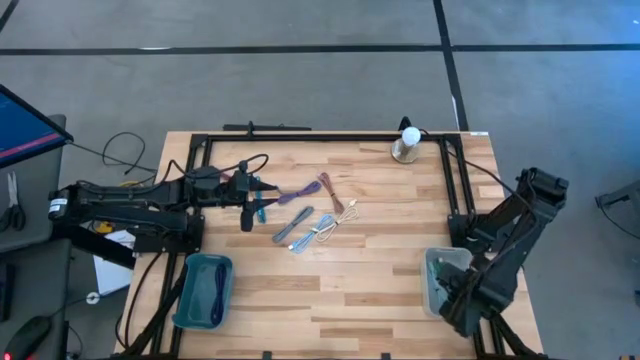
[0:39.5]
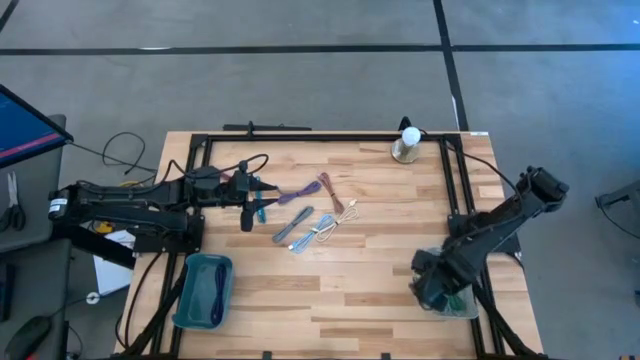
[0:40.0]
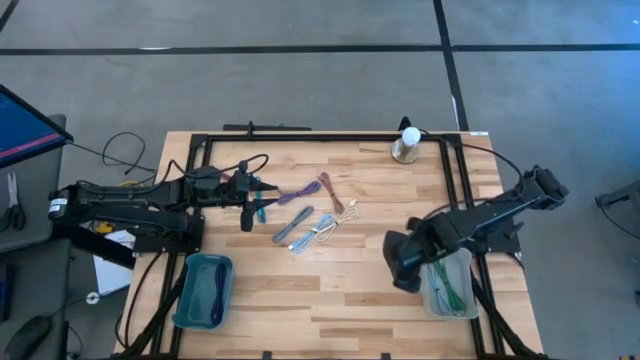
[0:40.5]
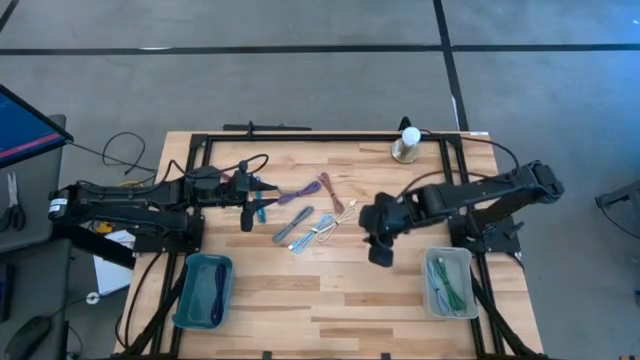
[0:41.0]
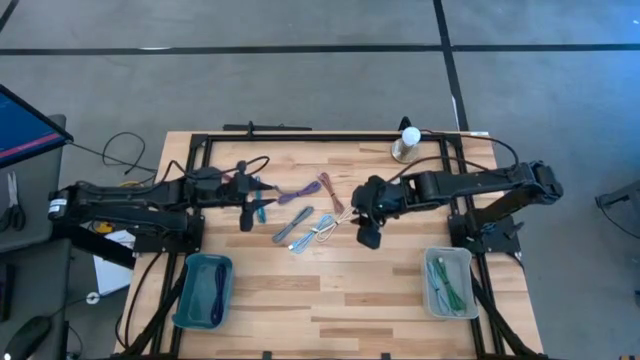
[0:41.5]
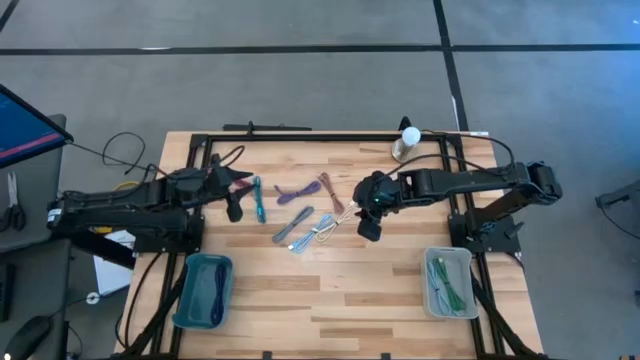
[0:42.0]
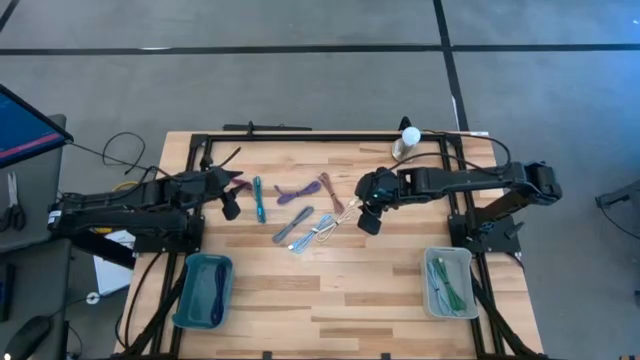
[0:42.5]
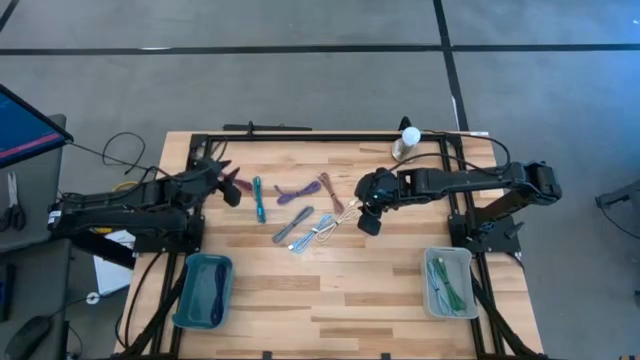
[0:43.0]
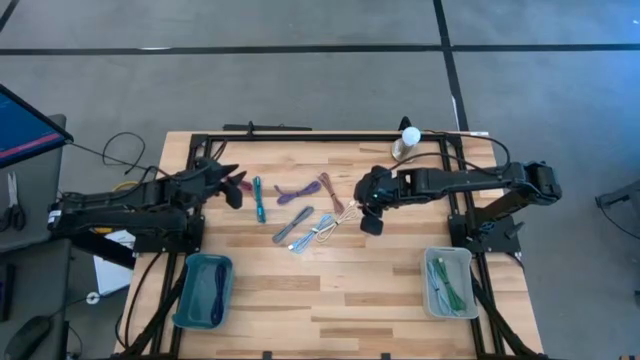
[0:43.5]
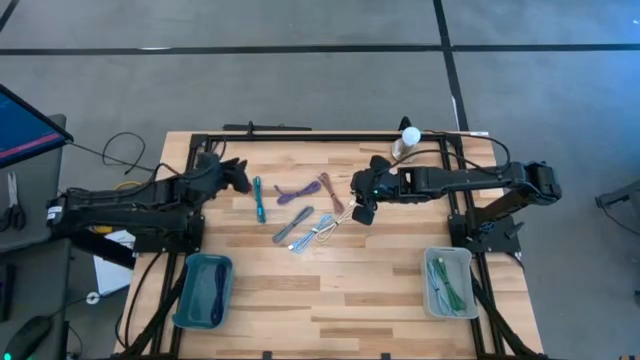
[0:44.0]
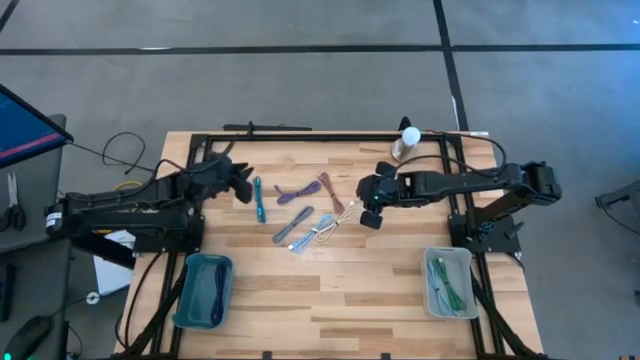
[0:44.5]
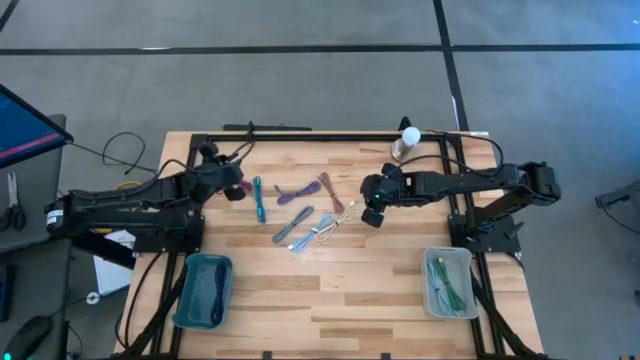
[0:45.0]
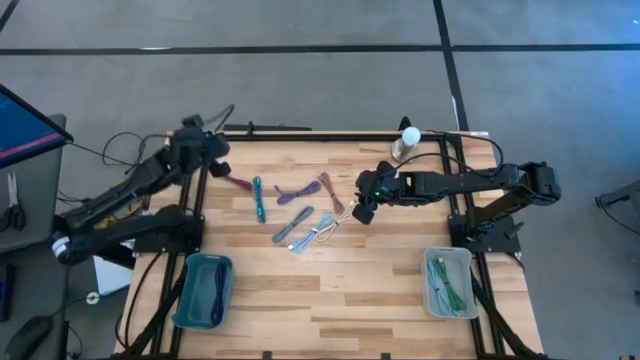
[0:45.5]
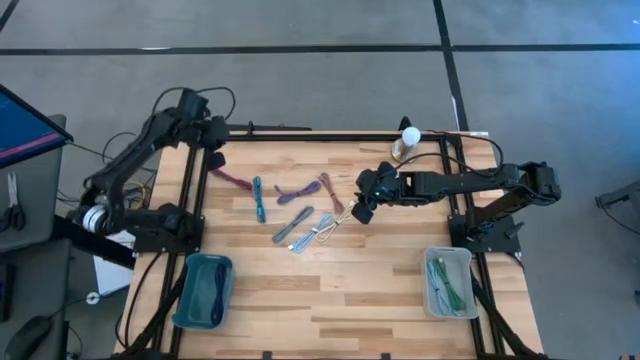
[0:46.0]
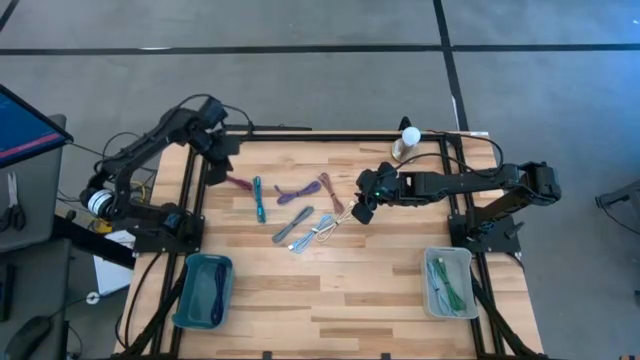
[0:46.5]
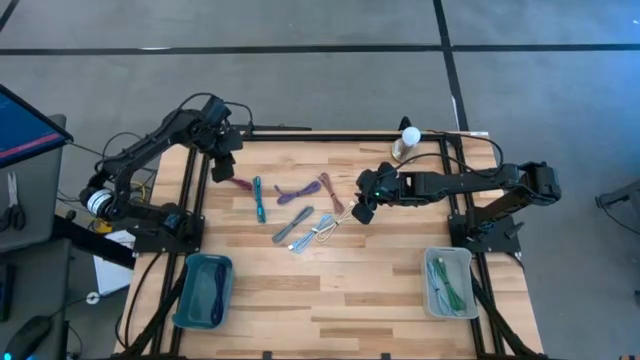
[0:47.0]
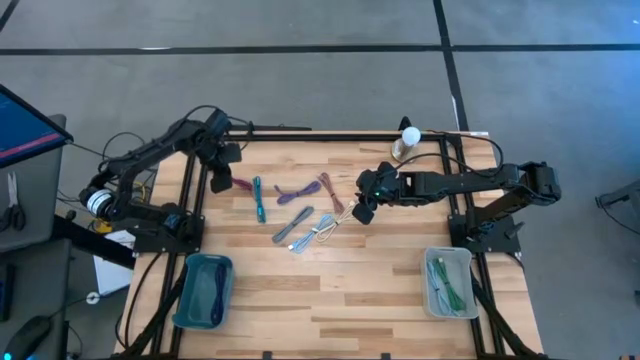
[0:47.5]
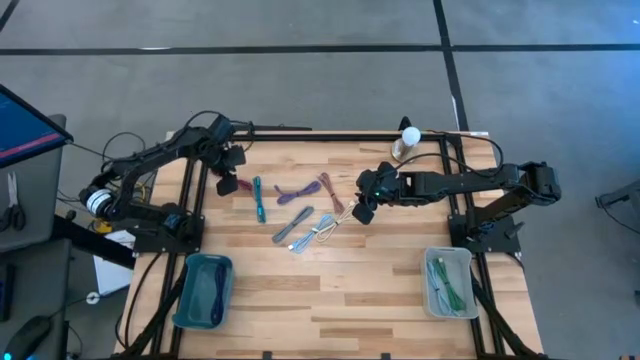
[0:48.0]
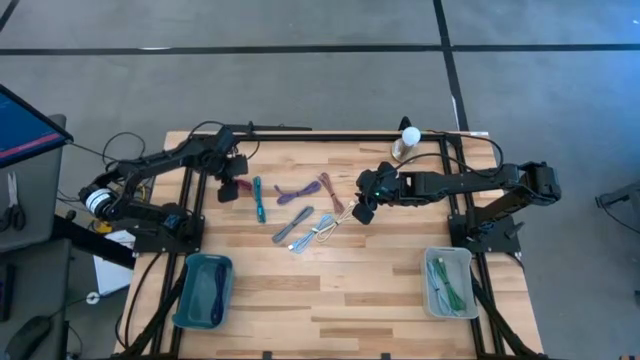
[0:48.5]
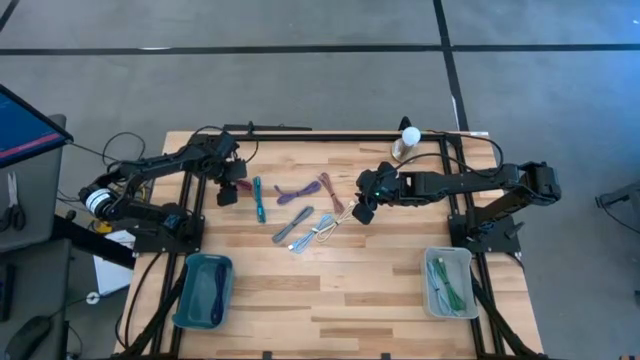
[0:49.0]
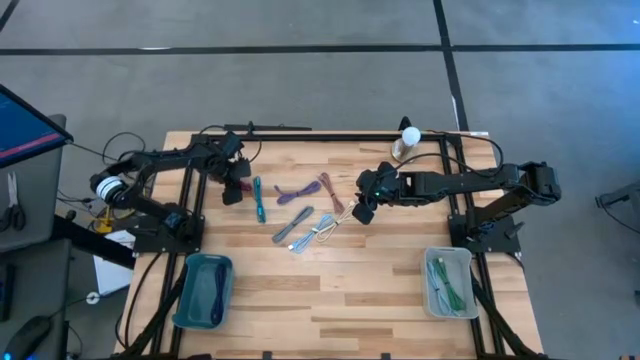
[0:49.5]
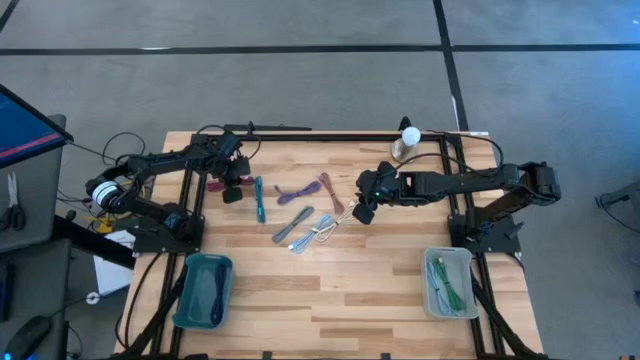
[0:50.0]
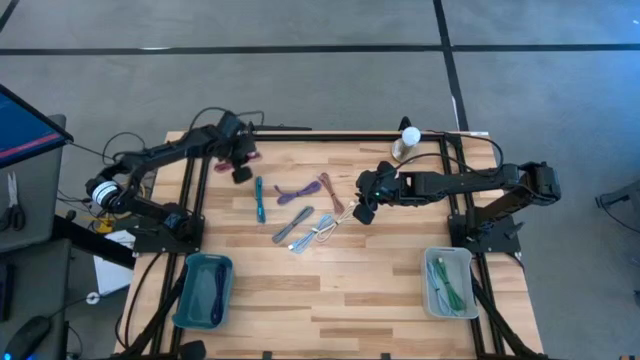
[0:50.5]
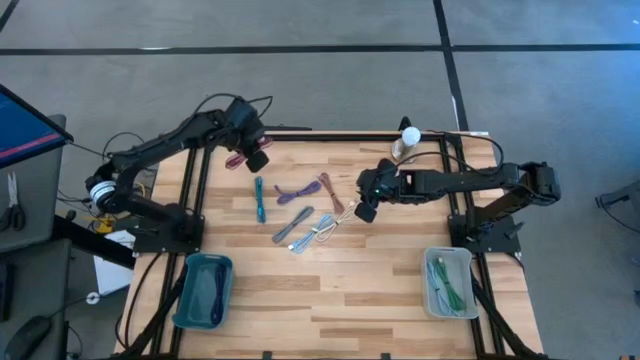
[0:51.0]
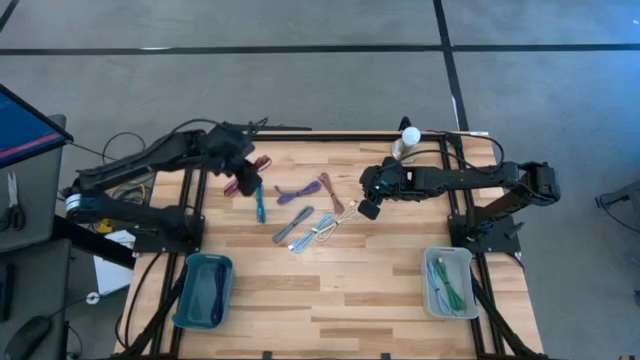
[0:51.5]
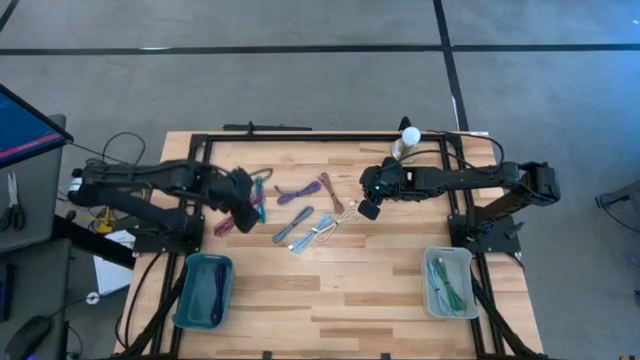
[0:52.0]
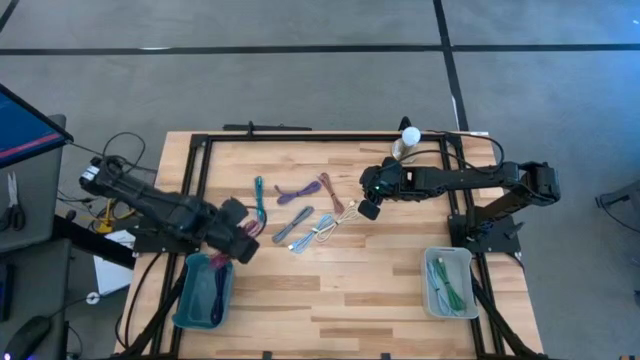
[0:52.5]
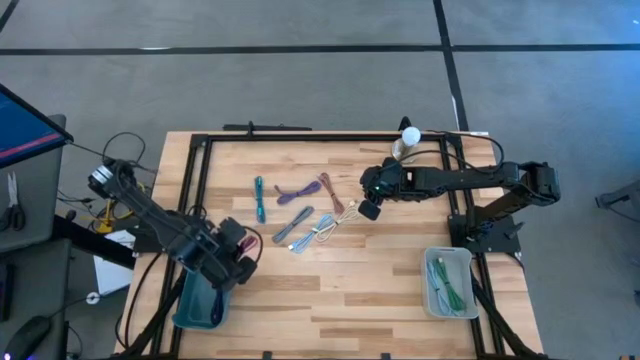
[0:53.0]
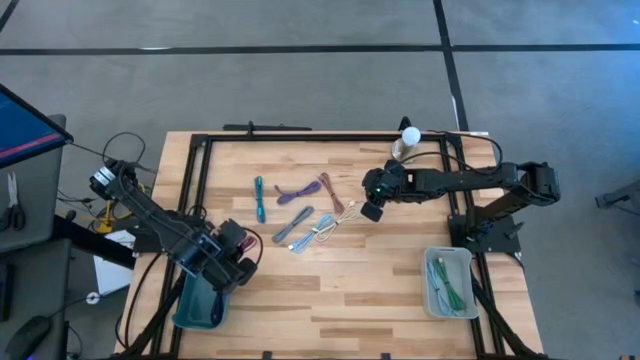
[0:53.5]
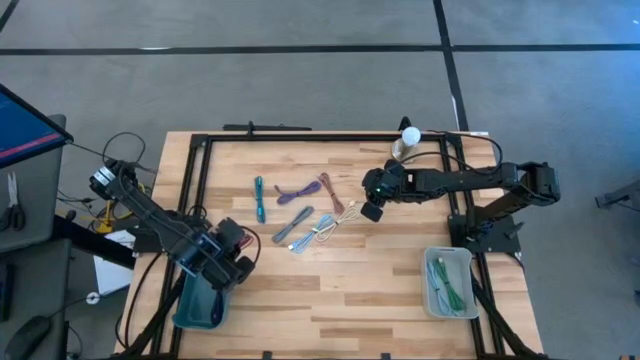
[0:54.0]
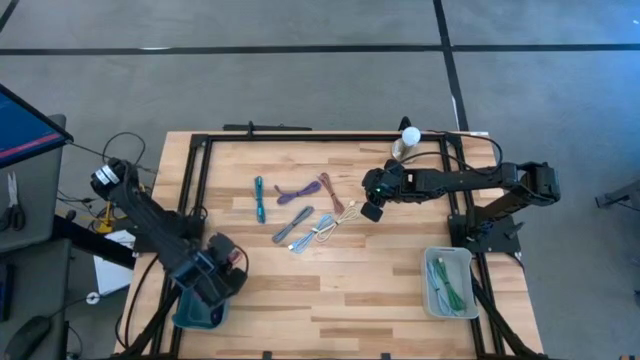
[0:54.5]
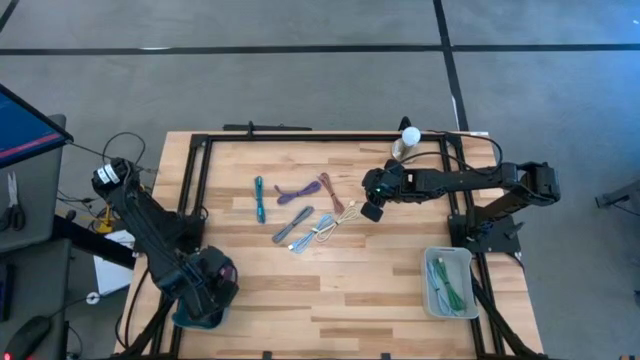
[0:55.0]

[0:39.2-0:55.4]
Task: Pick & Place USB Port
Put the pink patterned USB cable into the blue bin

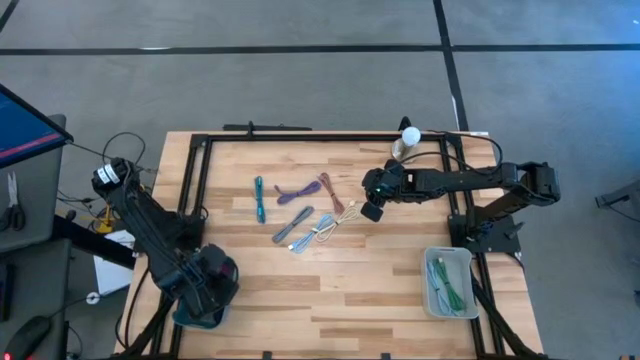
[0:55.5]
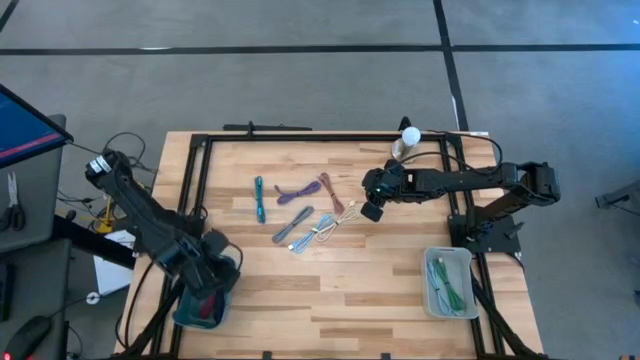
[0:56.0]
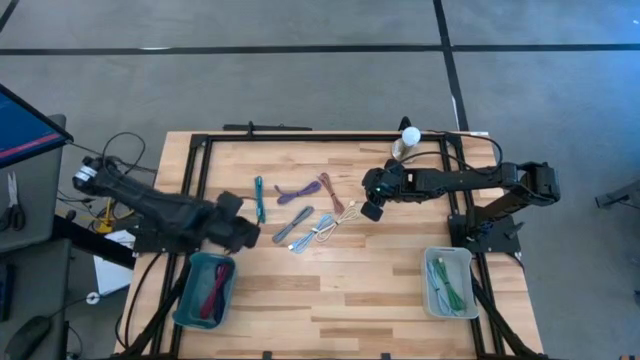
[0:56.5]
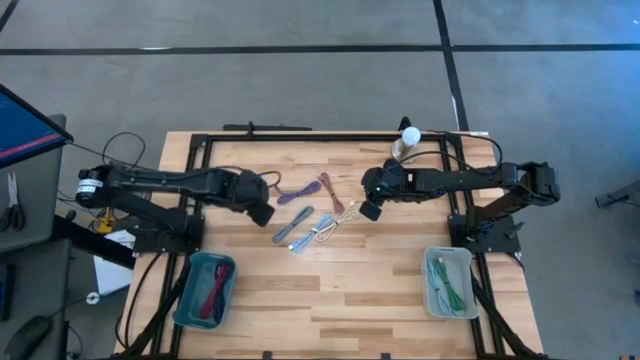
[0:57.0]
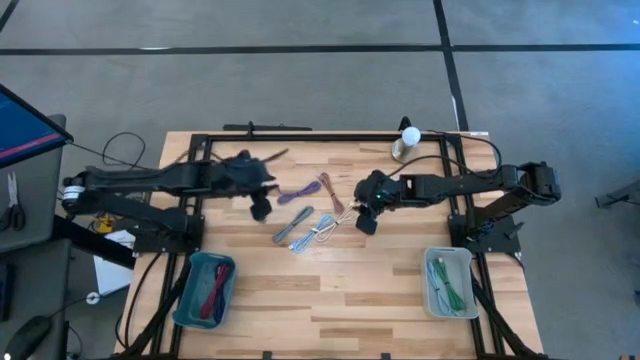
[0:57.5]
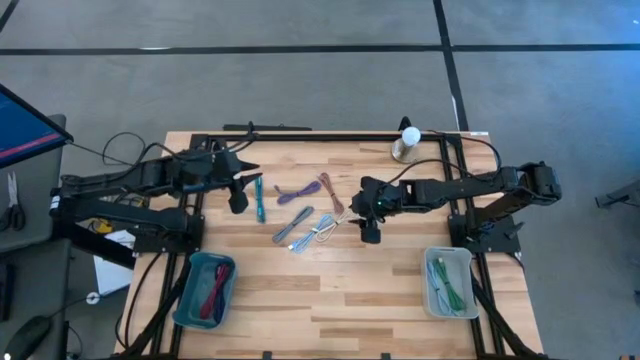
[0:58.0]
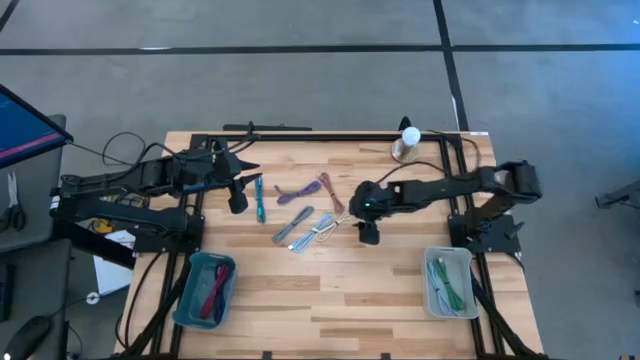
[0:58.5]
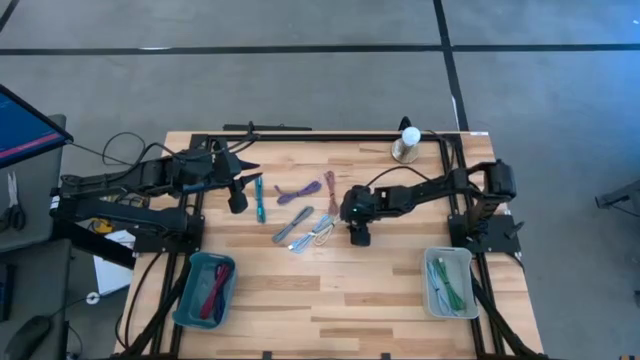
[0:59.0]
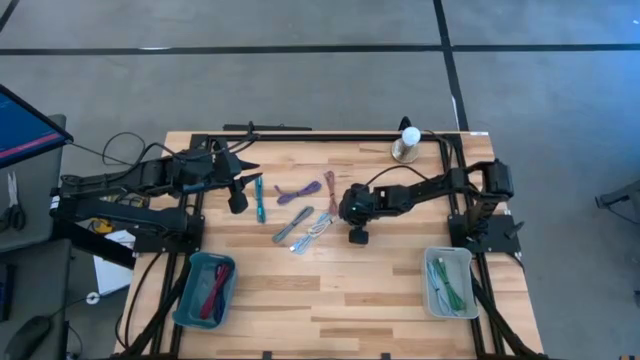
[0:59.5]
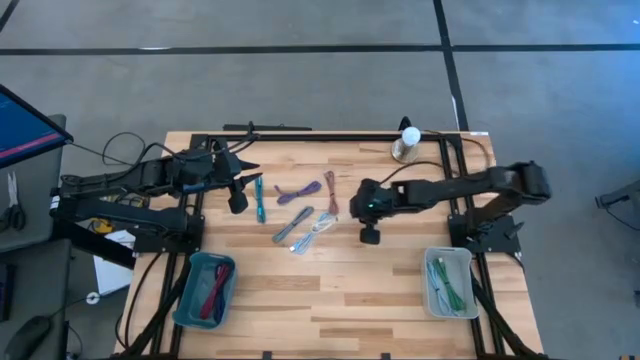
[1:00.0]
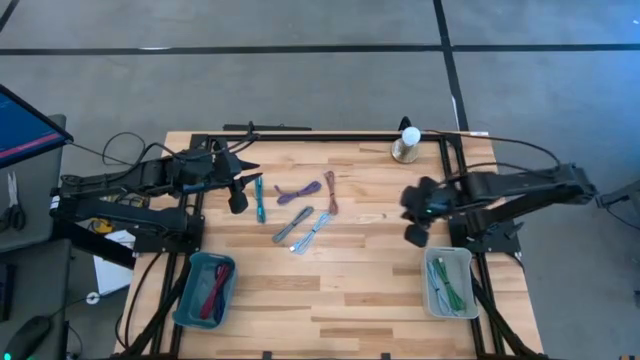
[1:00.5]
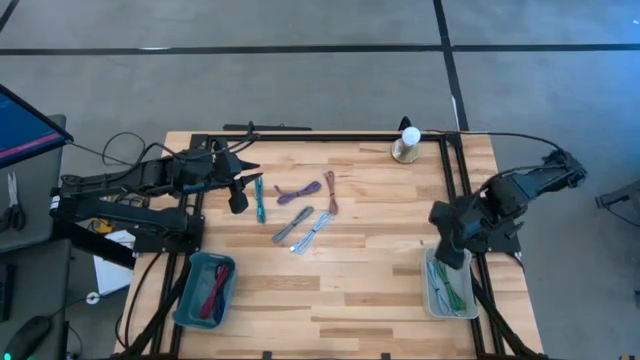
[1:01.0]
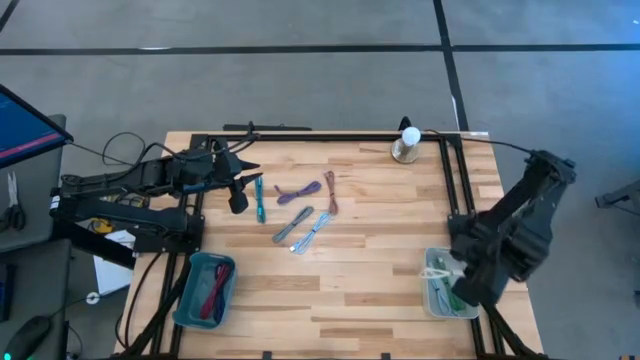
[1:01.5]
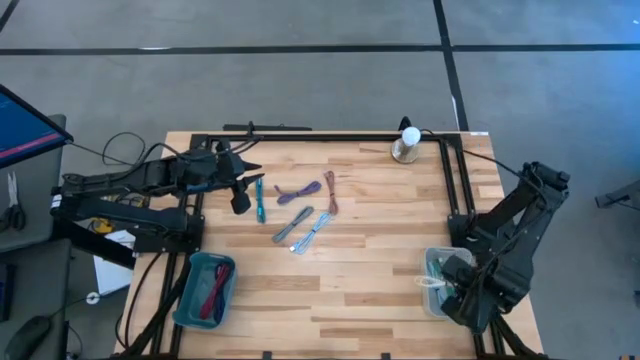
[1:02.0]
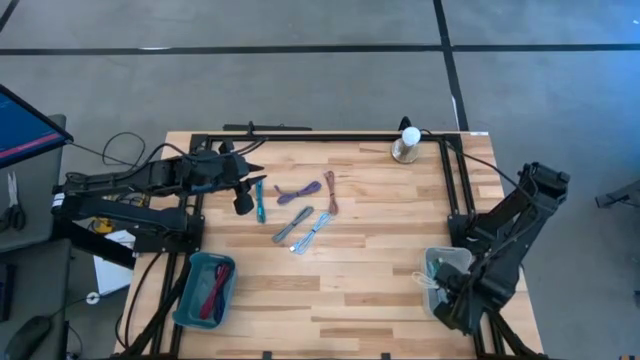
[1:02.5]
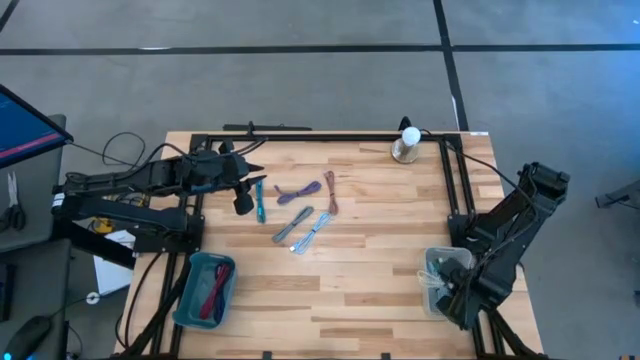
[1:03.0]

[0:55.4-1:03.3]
Put the white USB cable into the gray bin
